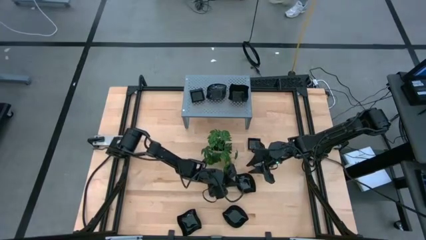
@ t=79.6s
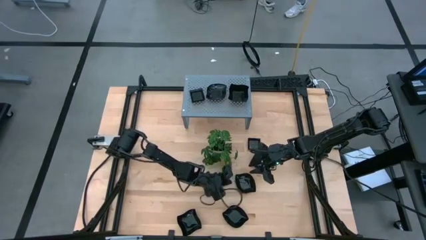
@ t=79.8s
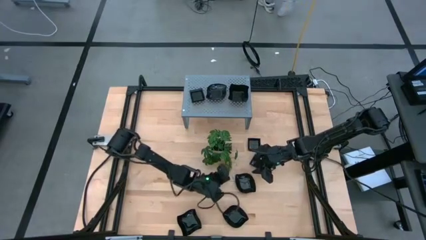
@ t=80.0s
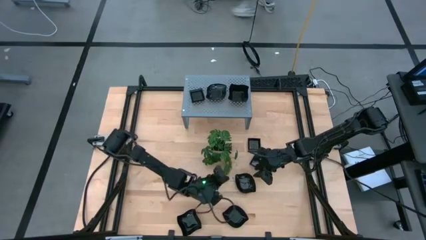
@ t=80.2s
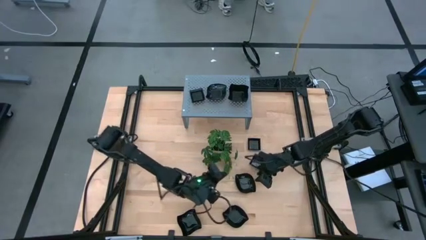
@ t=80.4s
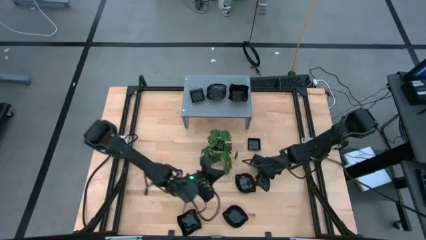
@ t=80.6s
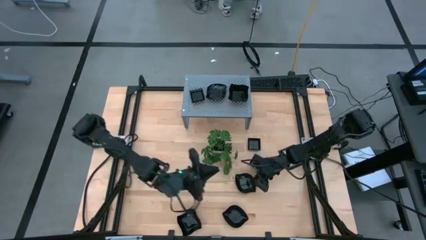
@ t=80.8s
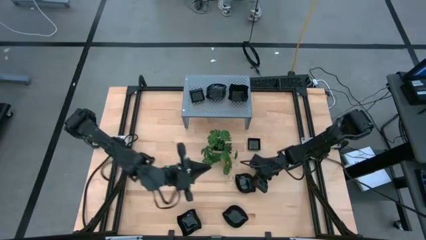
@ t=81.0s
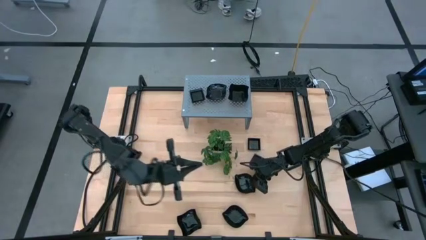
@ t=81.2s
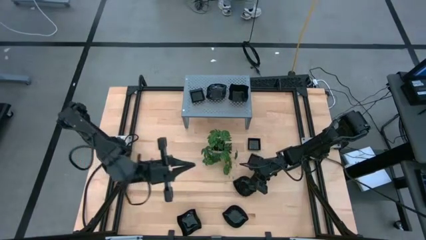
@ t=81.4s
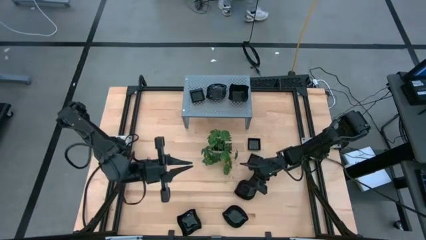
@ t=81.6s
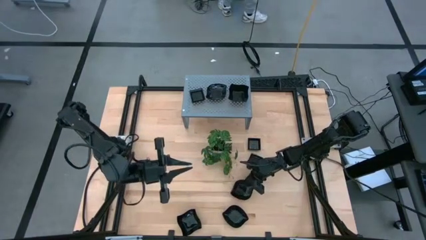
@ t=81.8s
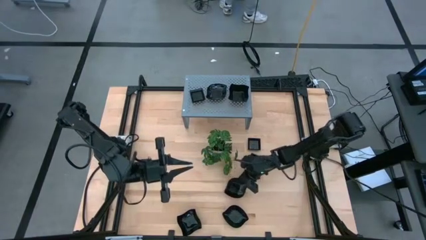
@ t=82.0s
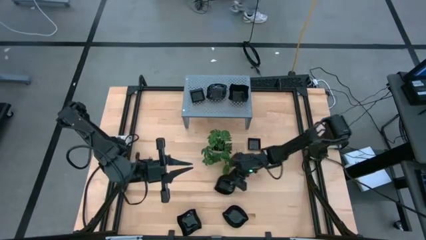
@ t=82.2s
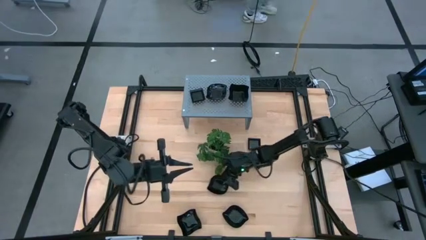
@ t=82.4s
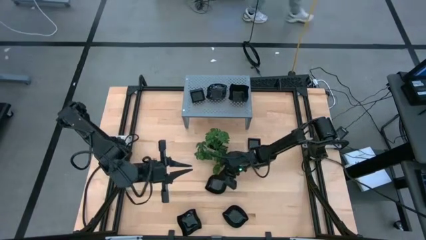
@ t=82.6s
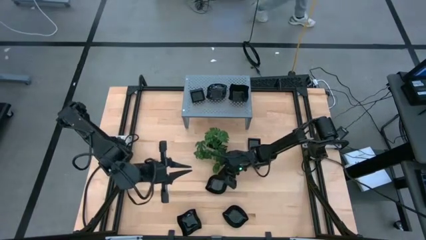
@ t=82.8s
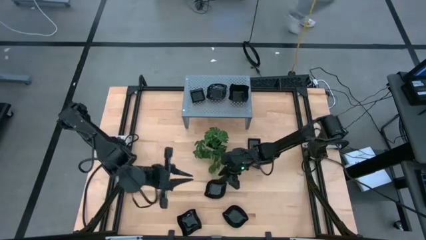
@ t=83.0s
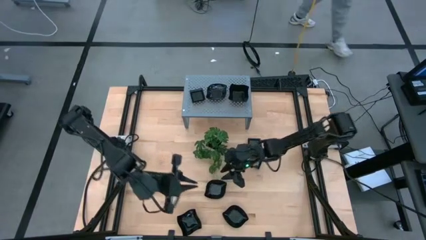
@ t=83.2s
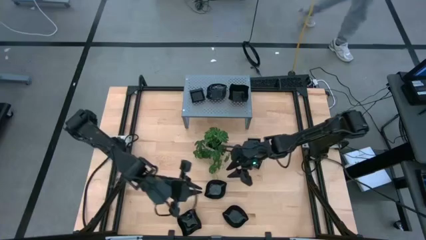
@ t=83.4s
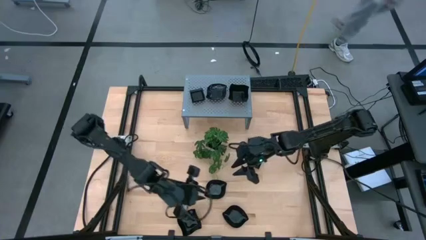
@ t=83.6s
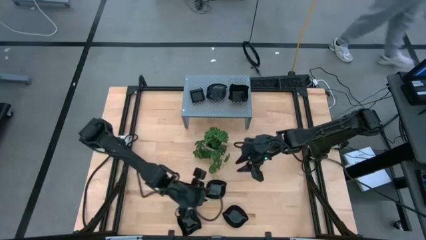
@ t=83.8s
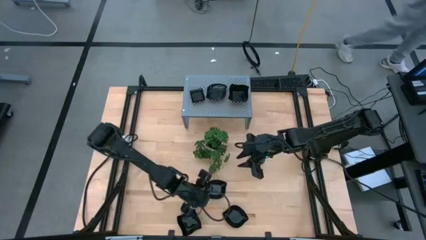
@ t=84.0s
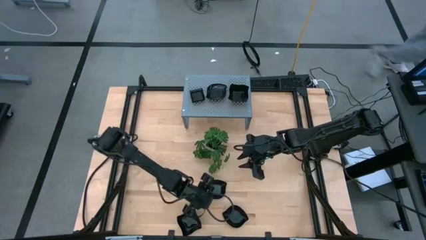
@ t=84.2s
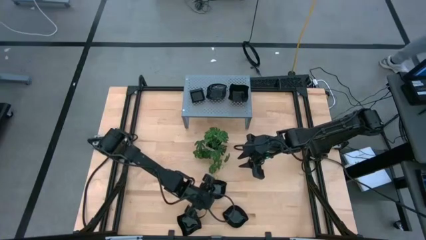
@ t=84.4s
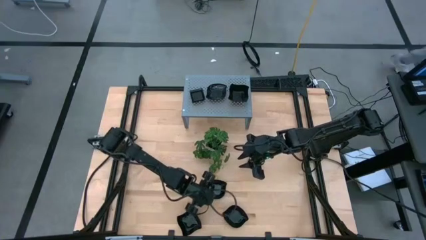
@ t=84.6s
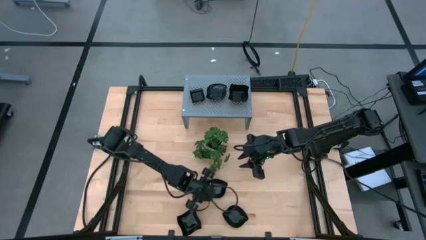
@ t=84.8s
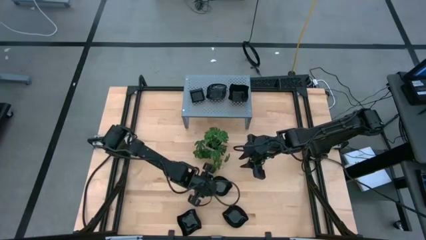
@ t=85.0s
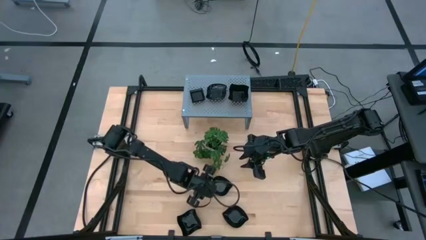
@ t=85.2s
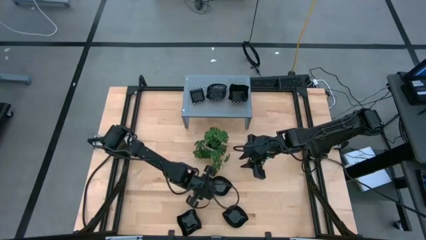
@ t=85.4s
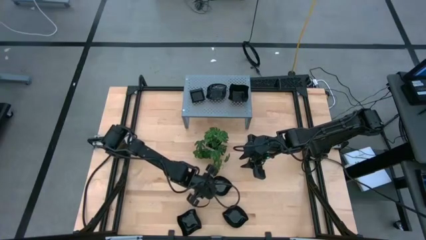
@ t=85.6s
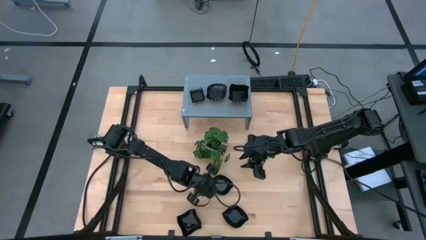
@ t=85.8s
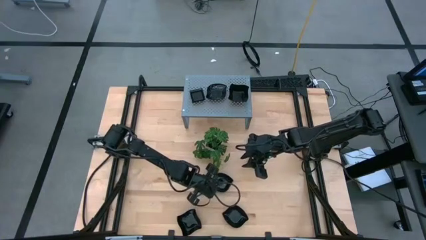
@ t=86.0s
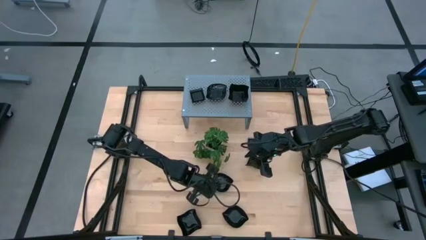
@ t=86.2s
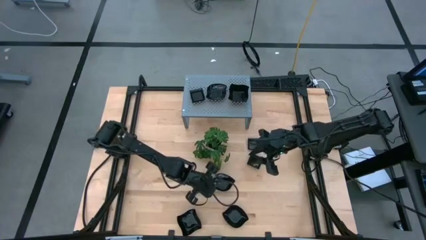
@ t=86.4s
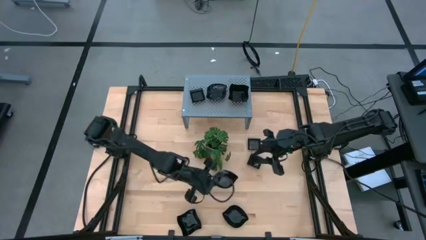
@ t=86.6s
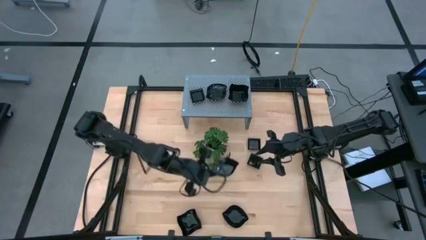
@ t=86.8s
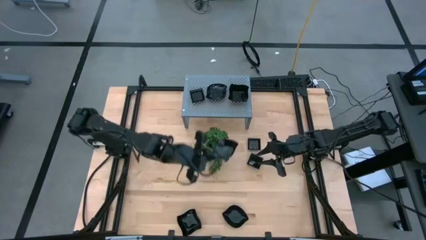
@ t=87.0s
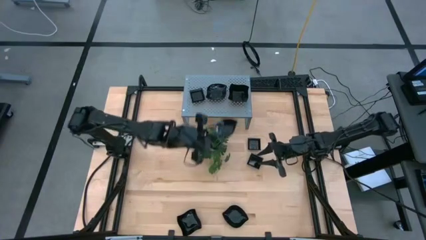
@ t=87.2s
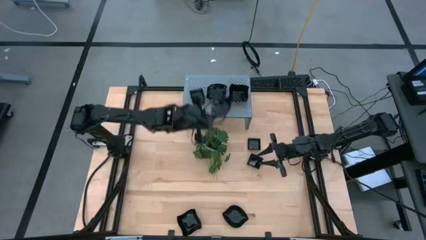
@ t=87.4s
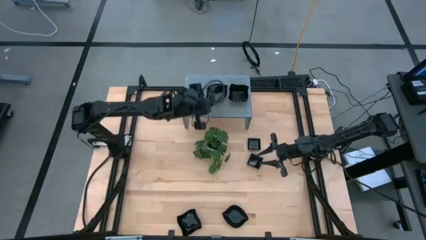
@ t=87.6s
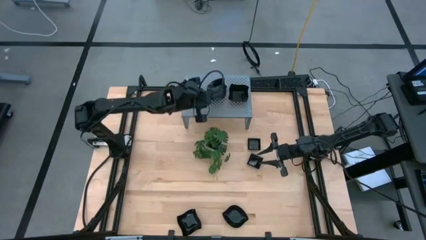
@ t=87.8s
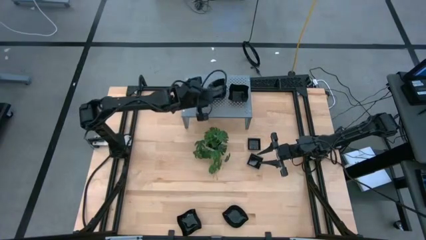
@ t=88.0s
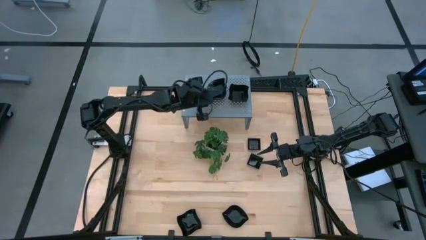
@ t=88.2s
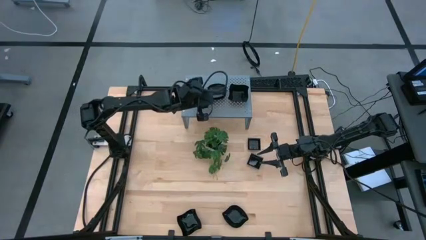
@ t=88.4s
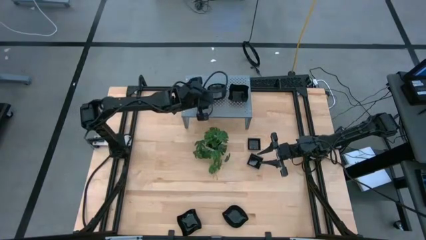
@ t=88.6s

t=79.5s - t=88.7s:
Task: Pick & Place Mini shaped plates
Stack the black leaf shaped plate on top of the other black leaf shaped plate on the shelf

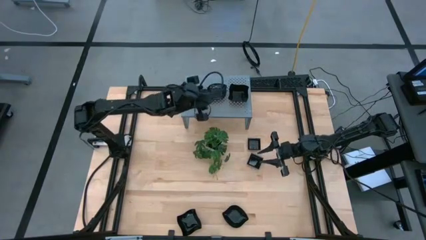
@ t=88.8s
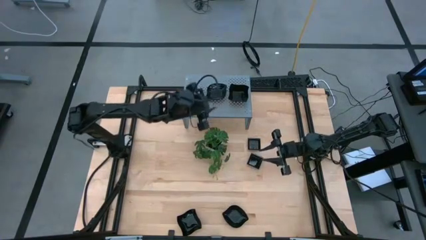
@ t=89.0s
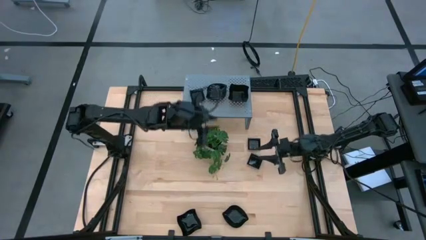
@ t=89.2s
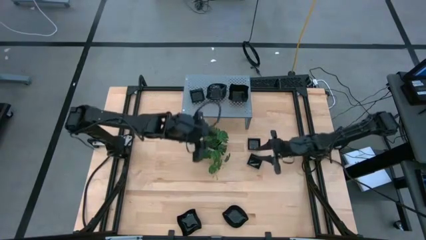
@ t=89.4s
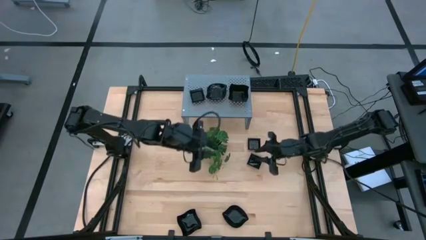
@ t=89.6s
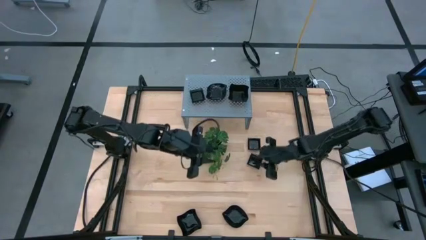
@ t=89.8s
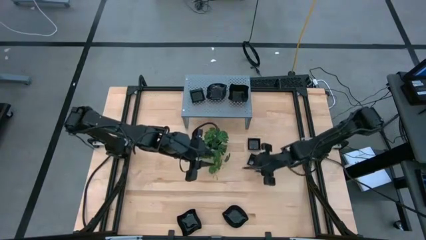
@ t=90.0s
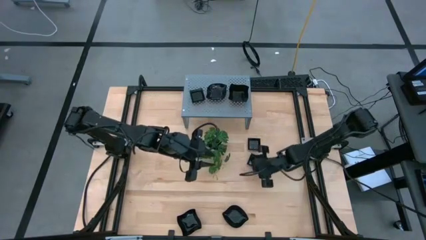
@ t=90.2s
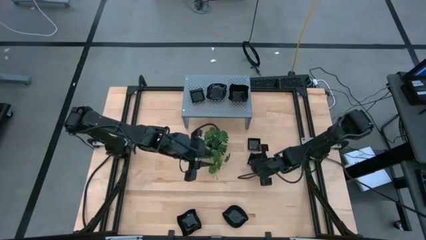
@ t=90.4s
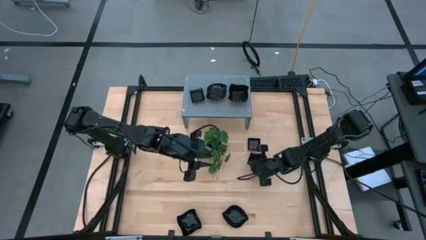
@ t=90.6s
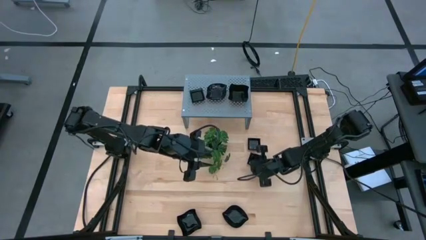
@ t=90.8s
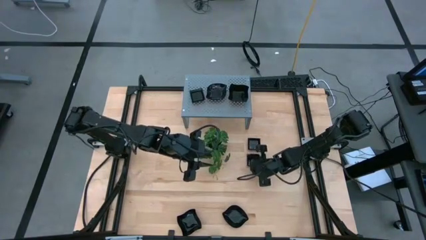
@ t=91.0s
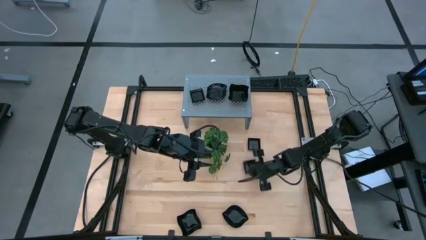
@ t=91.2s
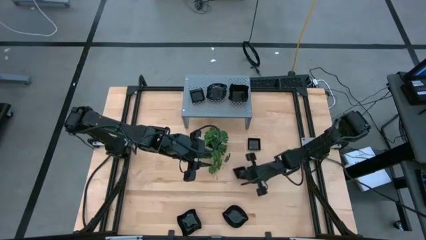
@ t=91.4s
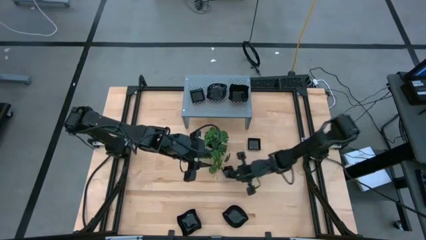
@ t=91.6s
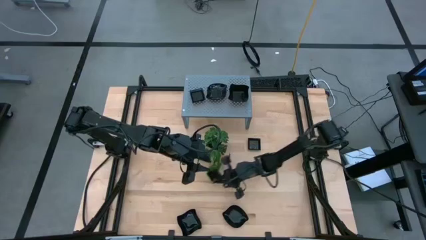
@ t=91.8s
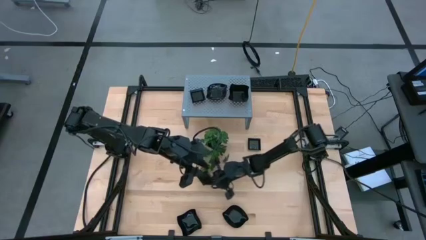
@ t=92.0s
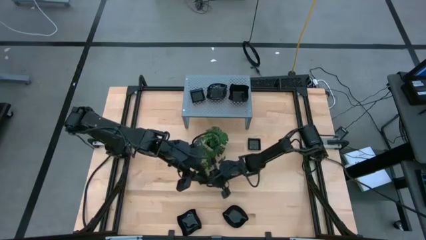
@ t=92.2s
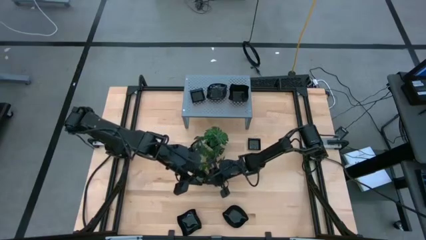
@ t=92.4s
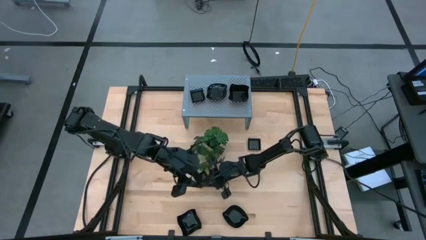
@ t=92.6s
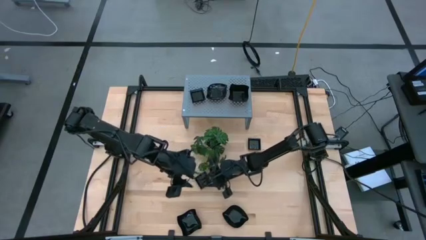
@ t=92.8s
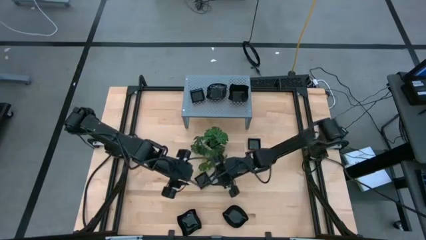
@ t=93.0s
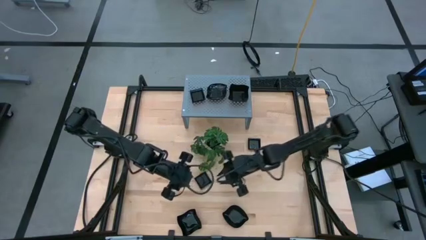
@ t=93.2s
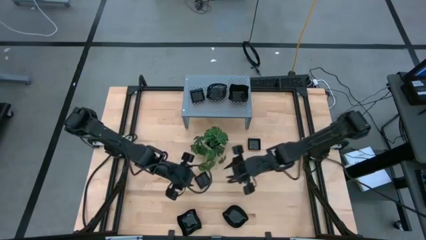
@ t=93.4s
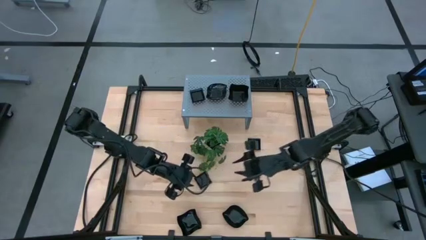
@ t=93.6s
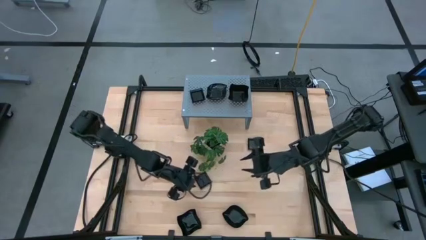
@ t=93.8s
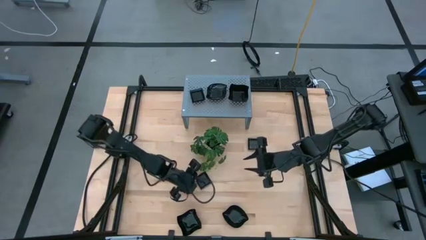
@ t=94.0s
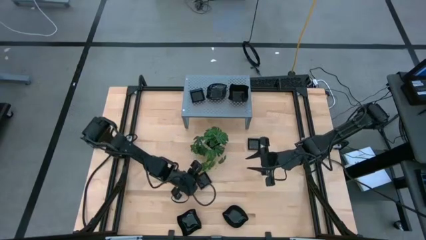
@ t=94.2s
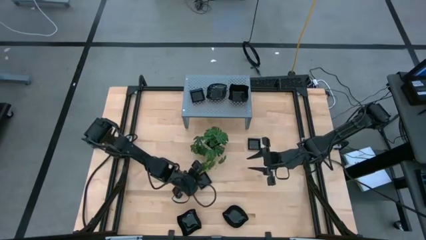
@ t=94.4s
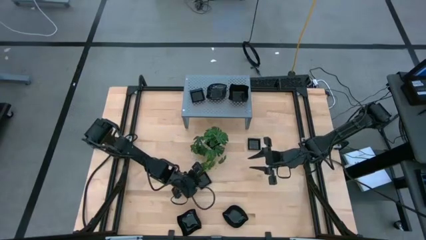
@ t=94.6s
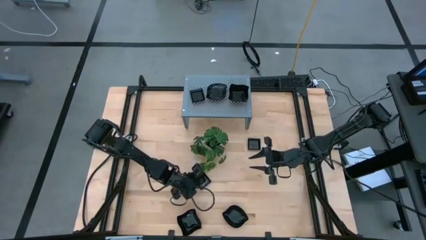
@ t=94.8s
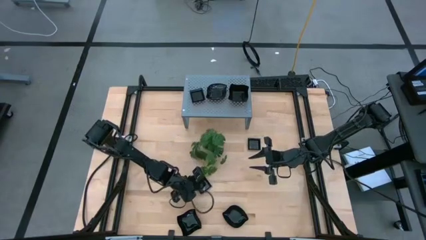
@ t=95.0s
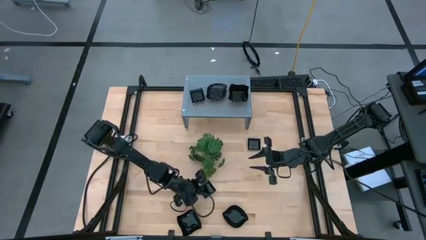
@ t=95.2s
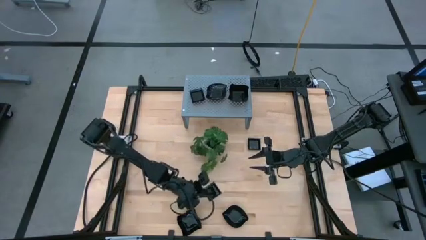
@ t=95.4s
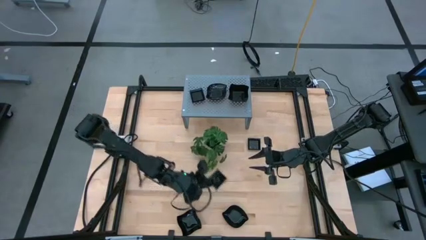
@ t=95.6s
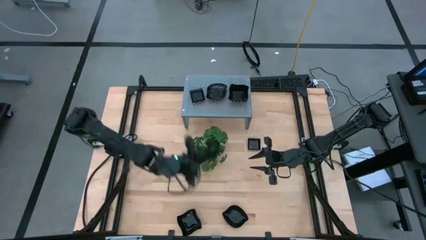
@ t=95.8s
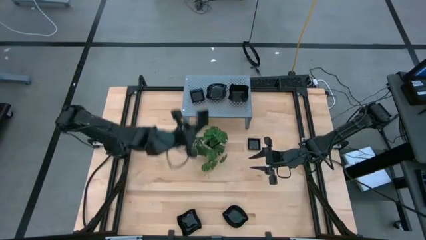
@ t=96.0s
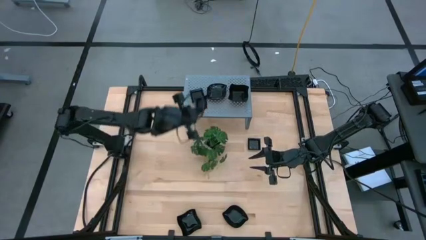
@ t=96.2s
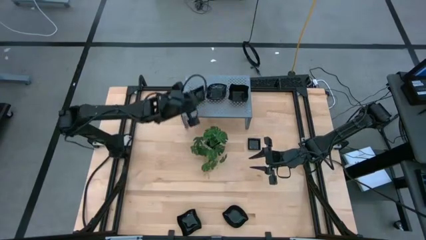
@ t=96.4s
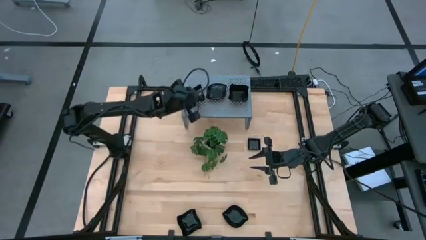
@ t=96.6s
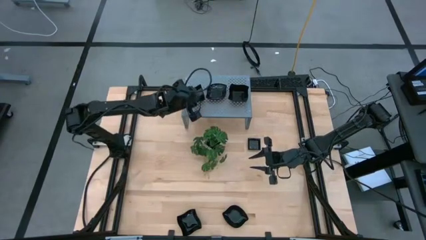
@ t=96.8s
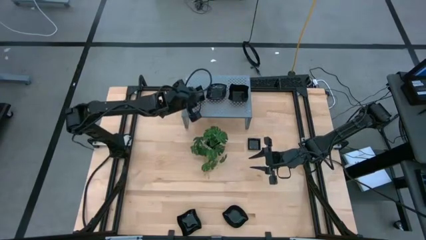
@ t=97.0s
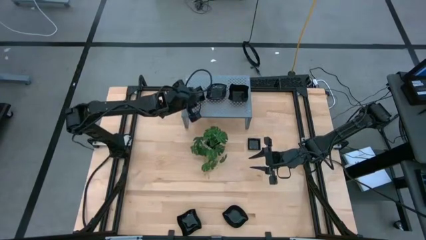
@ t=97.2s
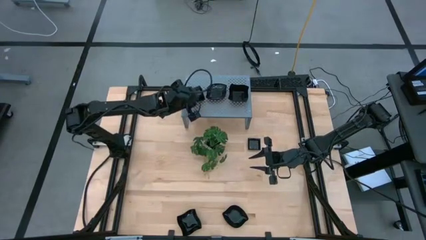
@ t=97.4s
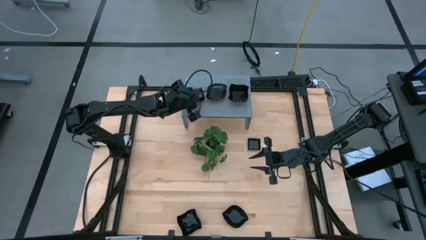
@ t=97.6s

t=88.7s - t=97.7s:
Stack the black square plate on top of the other black square plate on the shelf
